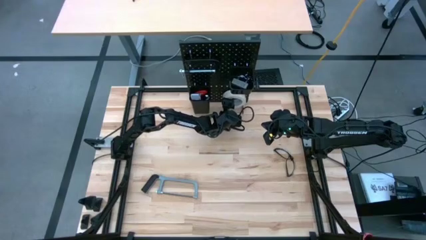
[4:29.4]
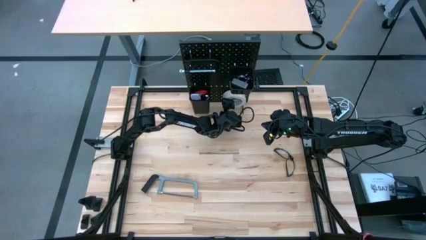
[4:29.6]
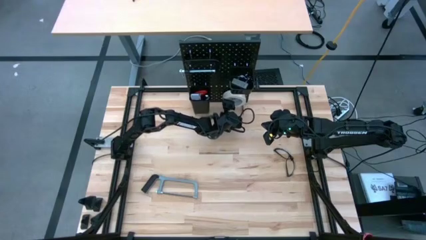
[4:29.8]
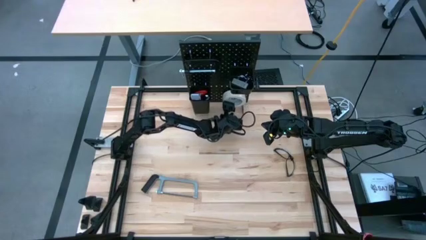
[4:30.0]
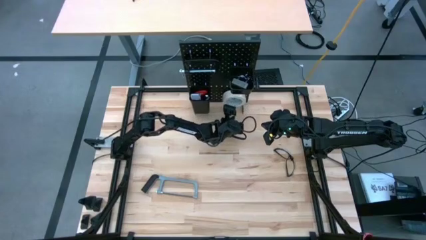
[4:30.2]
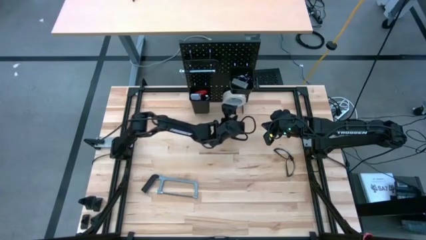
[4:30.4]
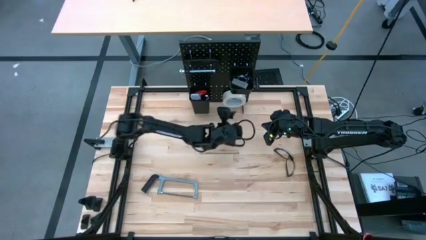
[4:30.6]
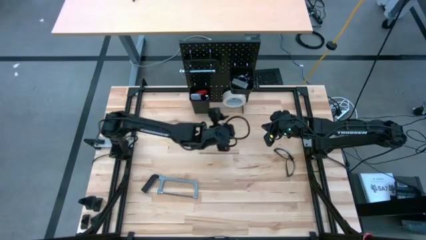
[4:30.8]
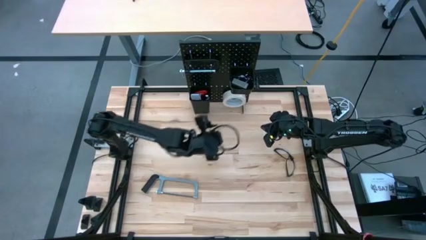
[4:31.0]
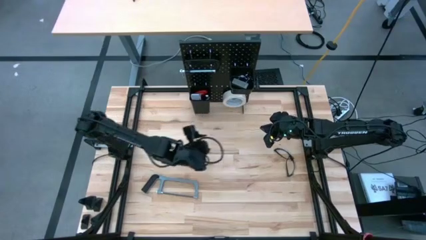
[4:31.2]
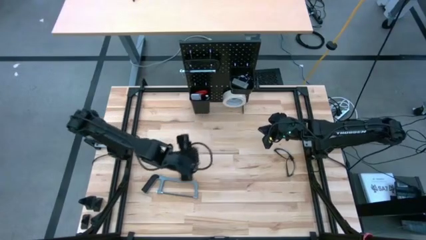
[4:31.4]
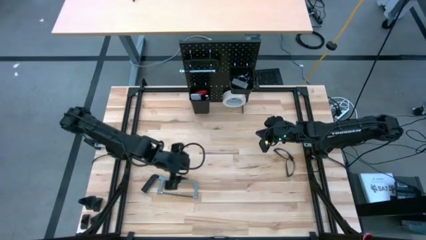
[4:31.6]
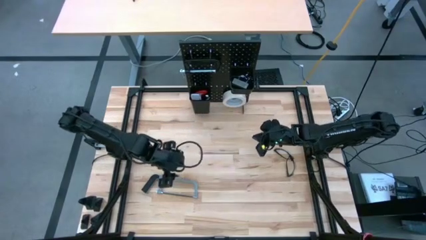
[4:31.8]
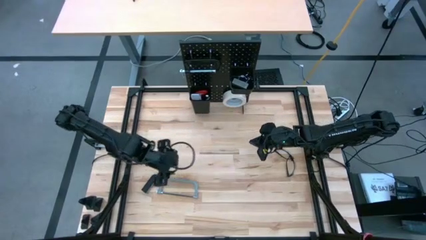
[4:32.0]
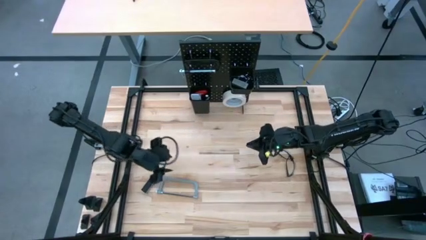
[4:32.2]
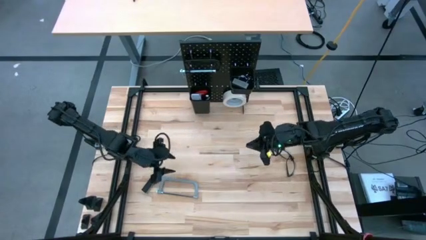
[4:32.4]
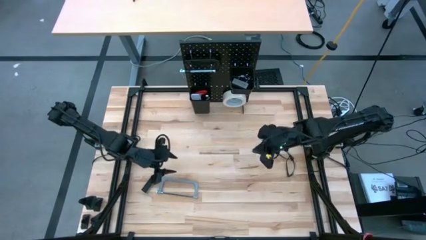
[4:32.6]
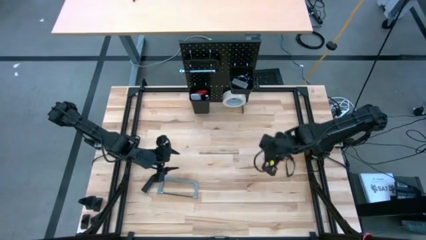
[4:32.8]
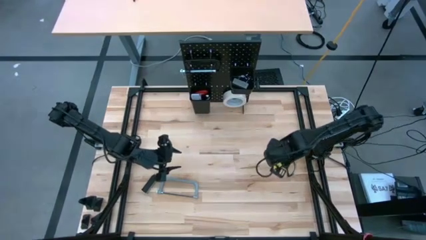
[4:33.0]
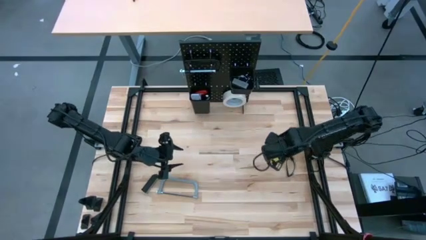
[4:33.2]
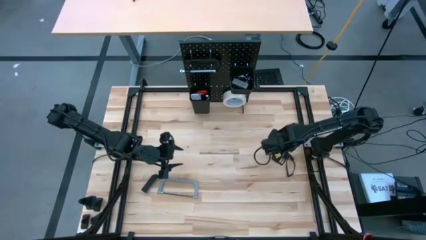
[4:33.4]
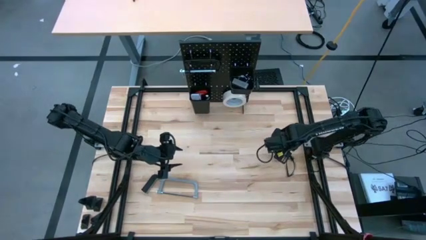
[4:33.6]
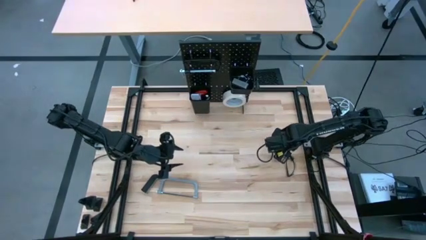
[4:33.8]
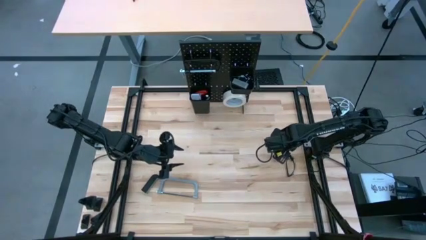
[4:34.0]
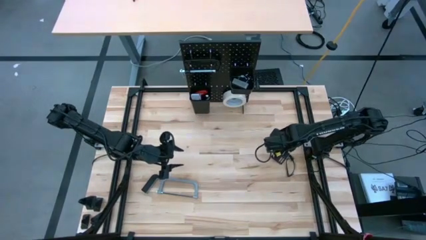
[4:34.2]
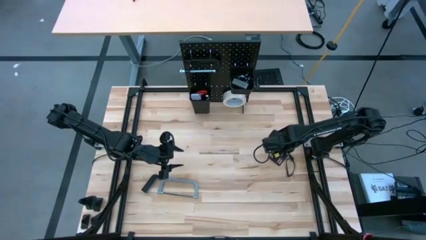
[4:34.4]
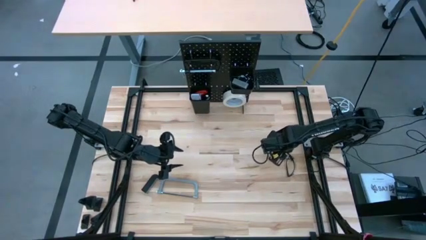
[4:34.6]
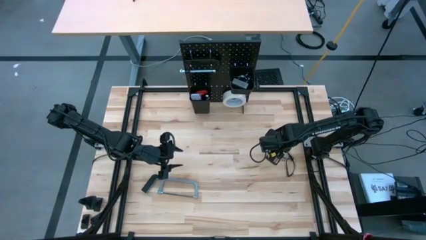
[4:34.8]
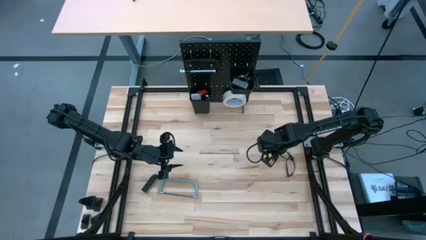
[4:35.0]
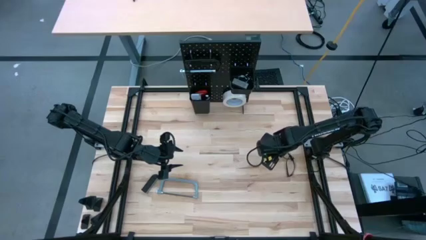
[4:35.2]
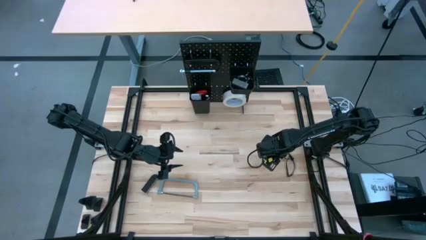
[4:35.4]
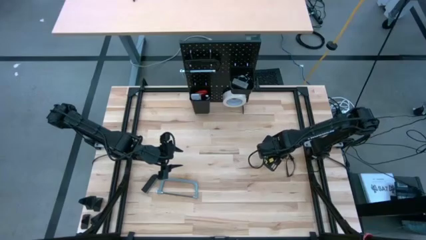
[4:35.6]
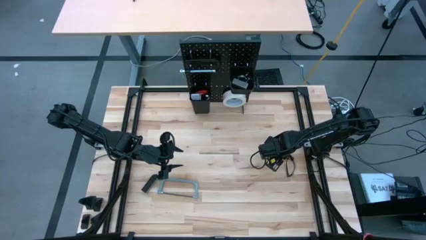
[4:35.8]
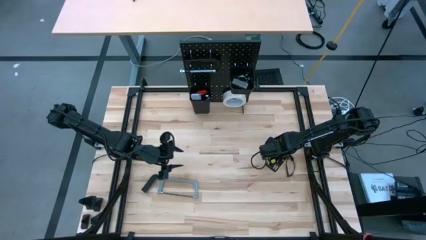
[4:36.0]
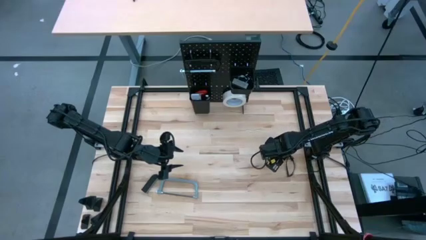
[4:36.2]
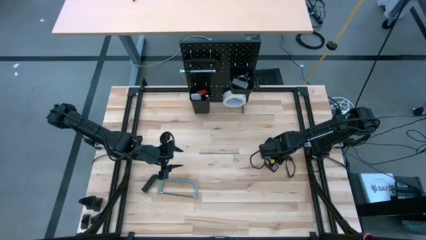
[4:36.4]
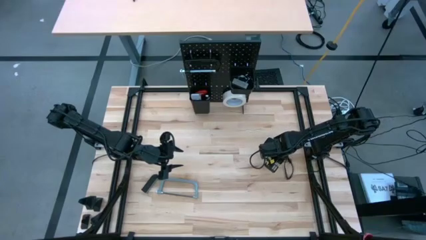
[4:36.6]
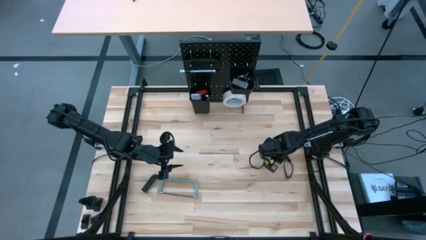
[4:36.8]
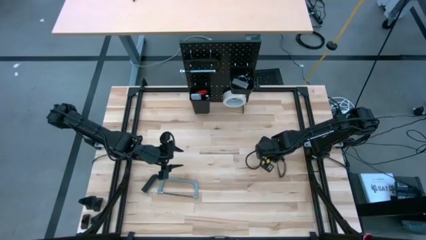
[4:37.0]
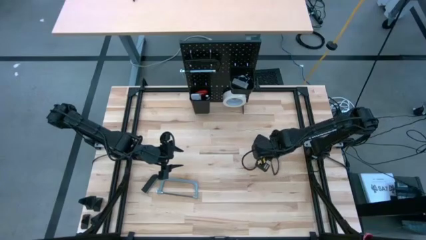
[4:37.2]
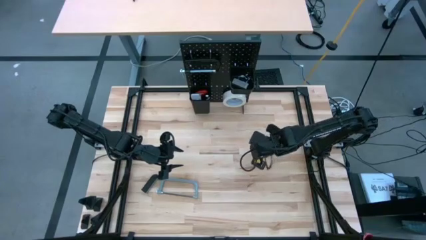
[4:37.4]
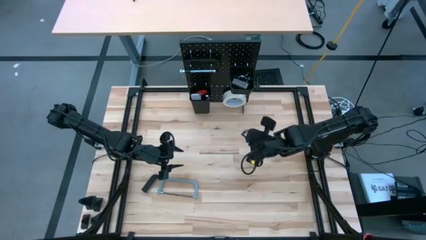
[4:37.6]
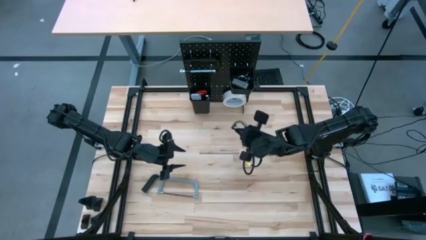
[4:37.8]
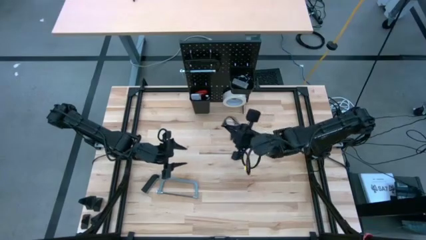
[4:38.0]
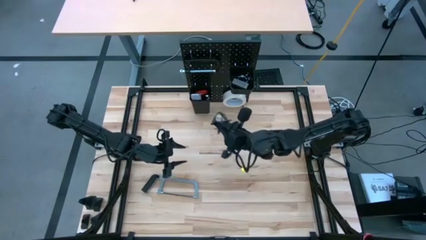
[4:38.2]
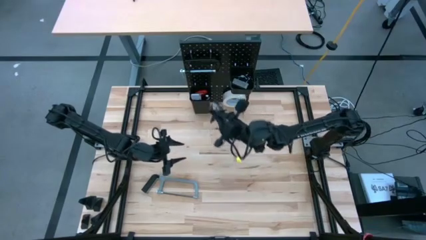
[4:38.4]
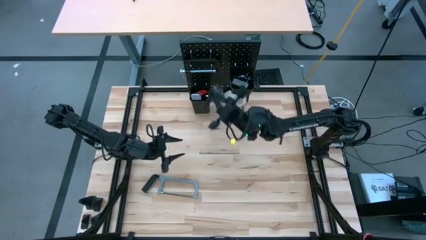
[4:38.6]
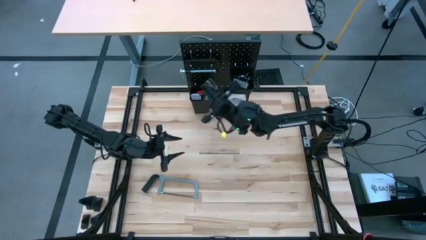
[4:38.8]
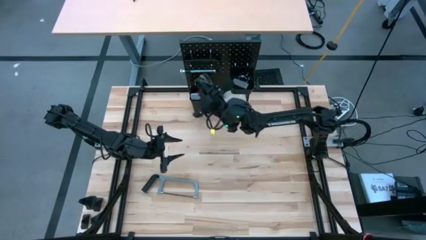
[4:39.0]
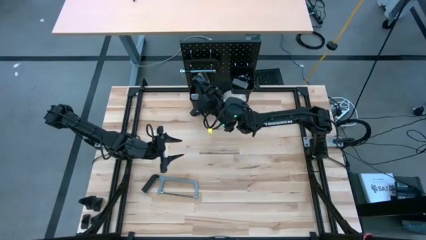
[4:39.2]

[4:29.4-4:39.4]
Task: Hang tools onto peg board
Put the black safety glasses into the left black tool bin

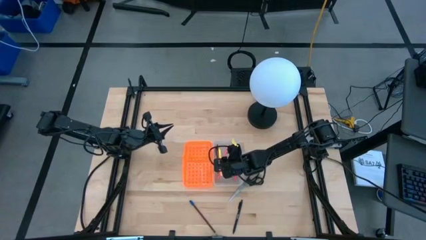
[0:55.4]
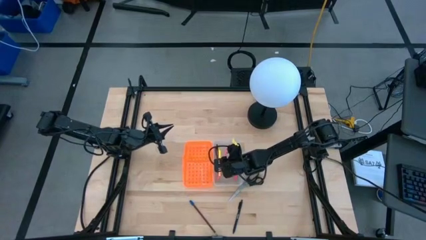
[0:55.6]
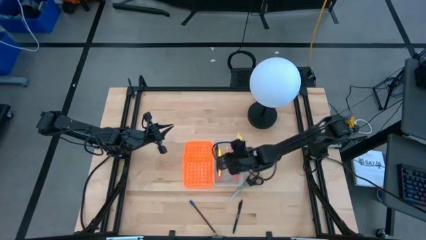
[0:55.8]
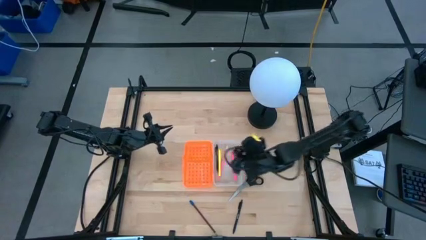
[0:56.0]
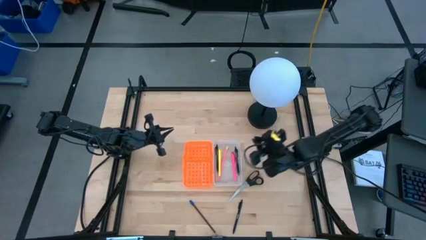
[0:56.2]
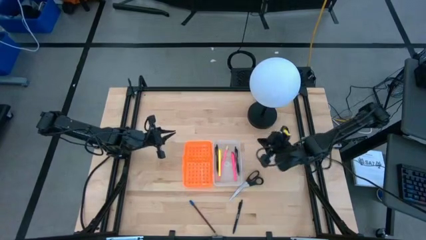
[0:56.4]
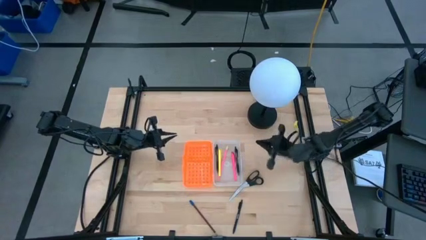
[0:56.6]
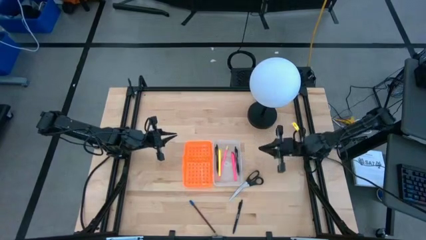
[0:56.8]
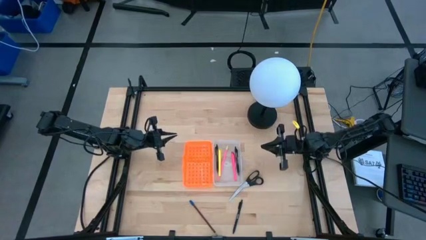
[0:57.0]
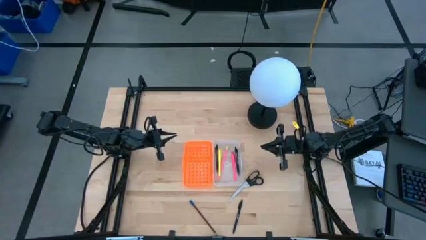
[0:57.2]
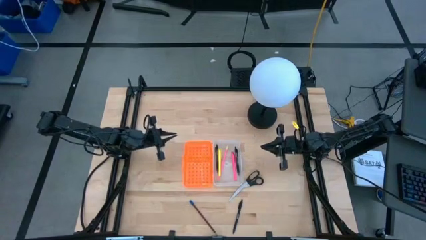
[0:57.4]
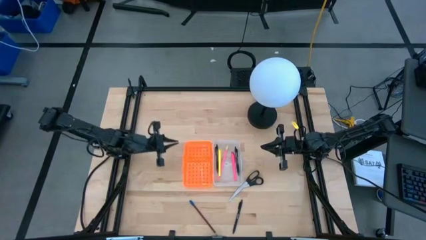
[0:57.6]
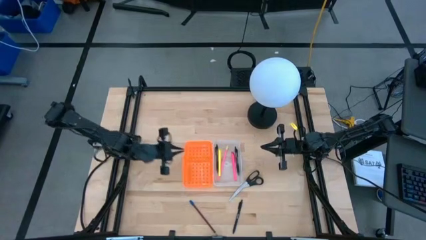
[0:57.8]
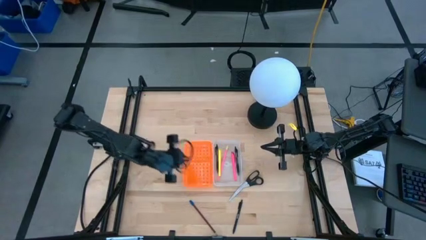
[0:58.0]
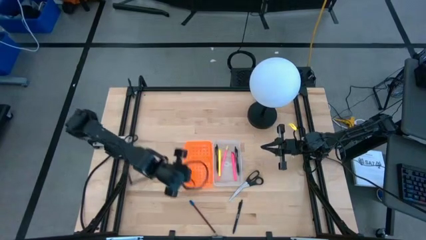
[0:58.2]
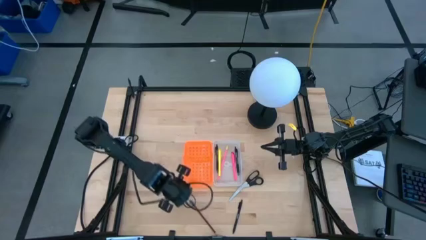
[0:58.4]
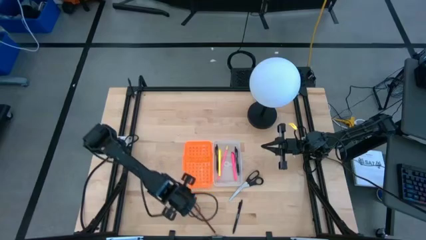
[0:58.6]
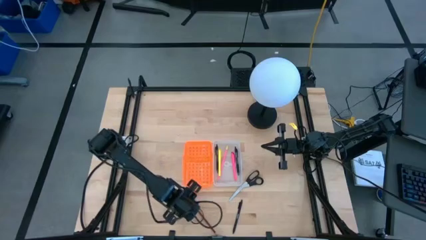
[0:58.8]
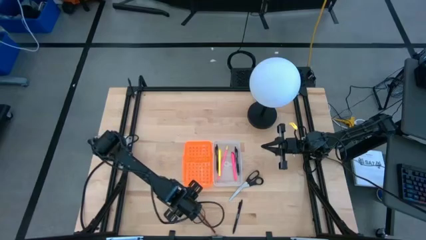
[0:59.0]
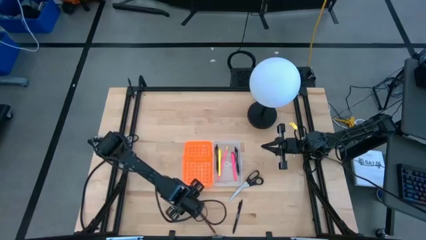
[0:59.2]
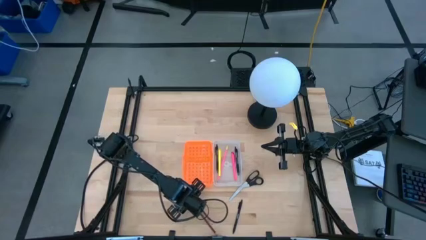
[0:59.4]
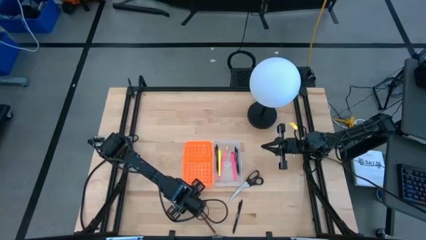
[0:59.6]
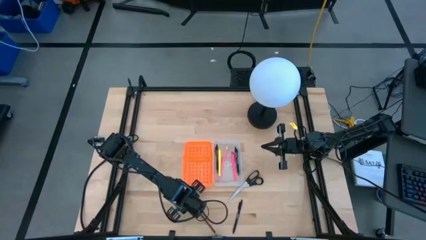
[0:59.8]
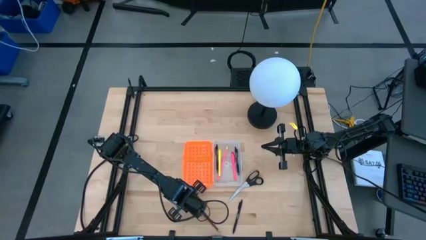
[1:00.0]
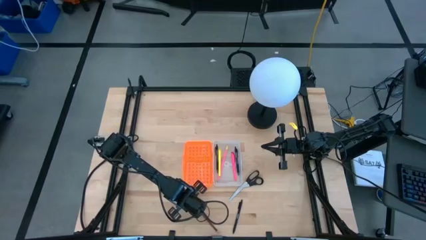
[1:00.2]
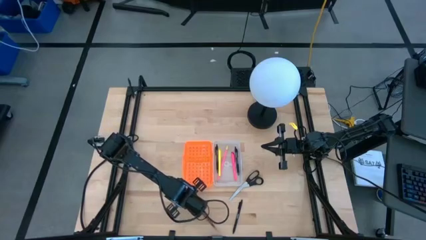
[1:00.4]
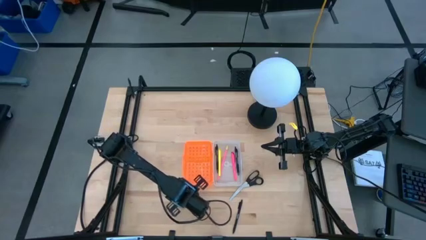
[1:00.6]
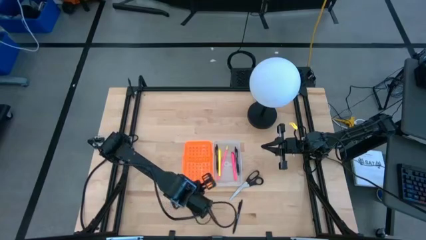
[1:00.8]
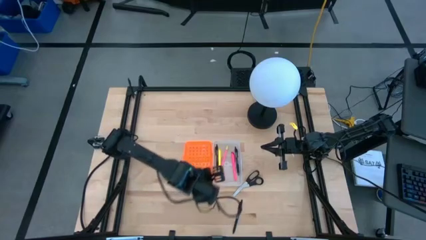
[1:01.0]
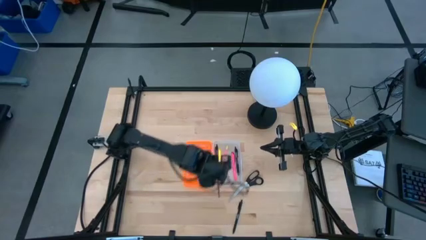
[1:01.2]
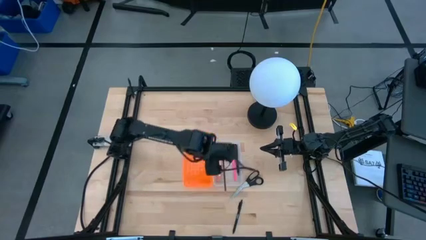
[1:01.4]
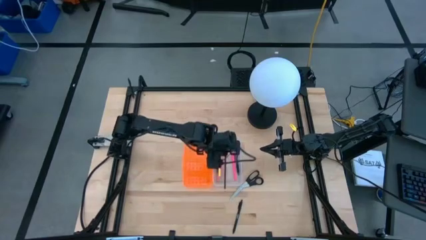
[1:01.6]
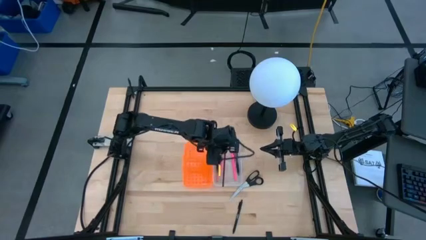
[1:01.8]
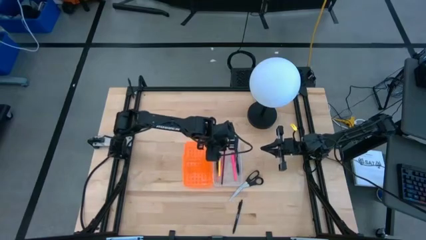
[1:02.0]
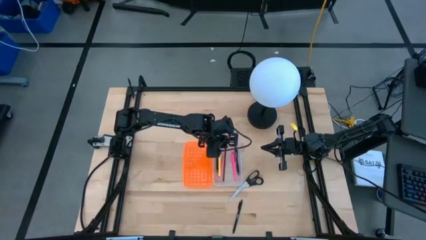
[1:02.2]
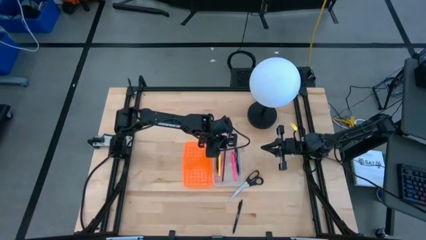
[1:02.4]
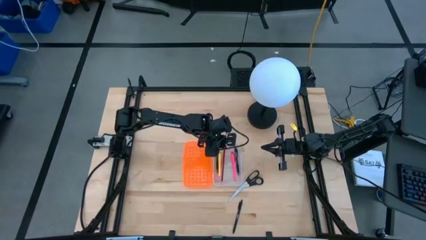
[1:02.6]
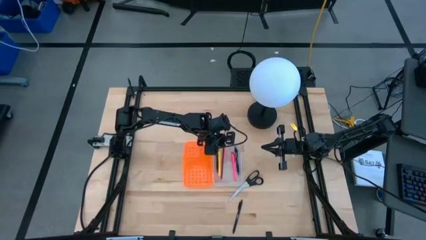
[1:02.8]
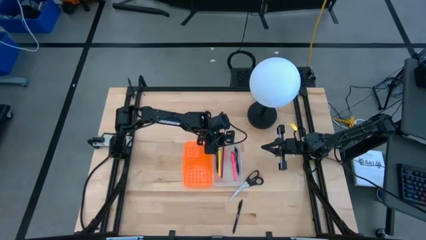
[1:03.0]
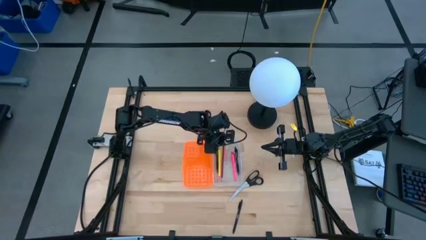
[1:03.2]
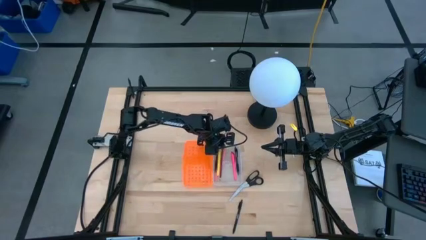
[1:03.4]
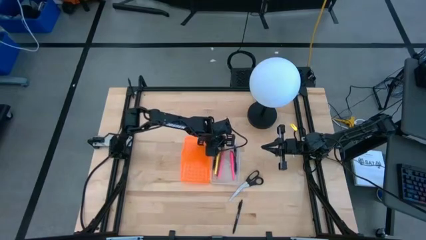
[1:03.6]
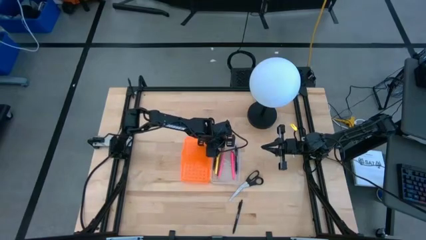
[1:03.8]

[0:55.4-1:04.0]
Task: Pick & place school supplies into a supply box
Put the brown pencil into the orange supply box
